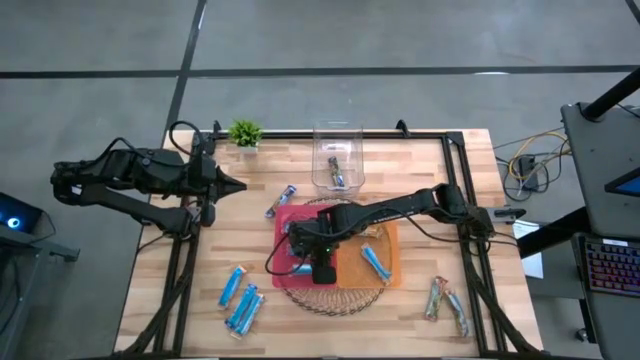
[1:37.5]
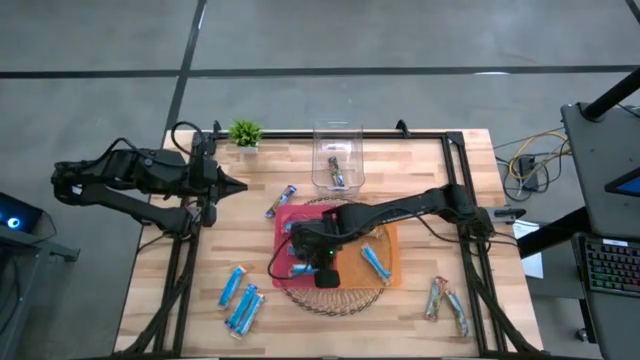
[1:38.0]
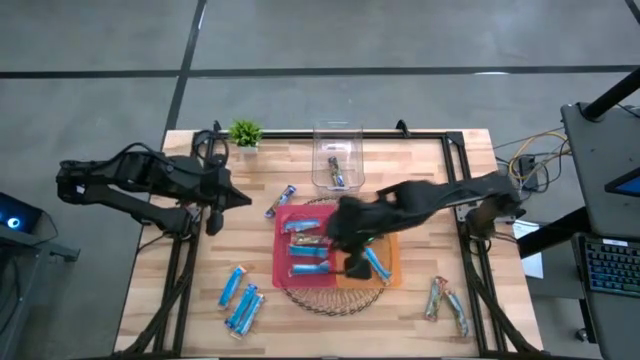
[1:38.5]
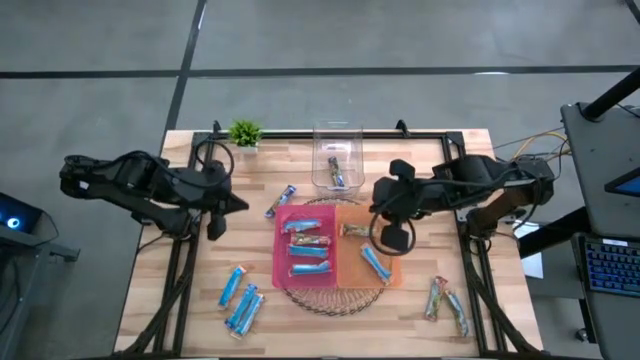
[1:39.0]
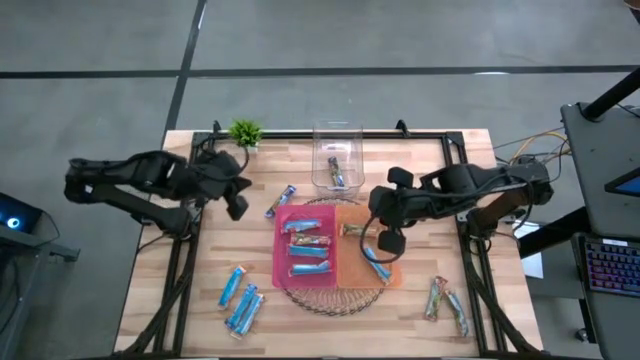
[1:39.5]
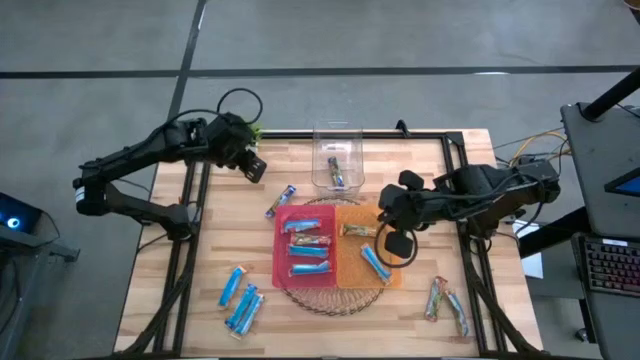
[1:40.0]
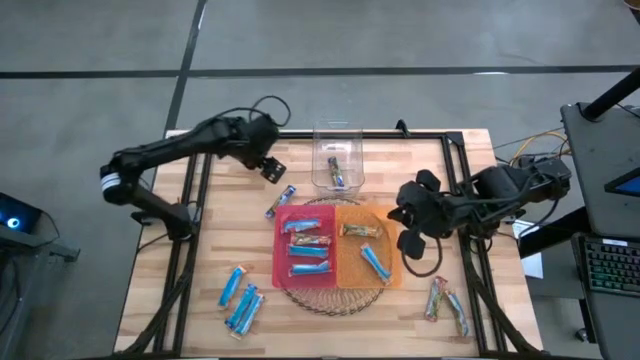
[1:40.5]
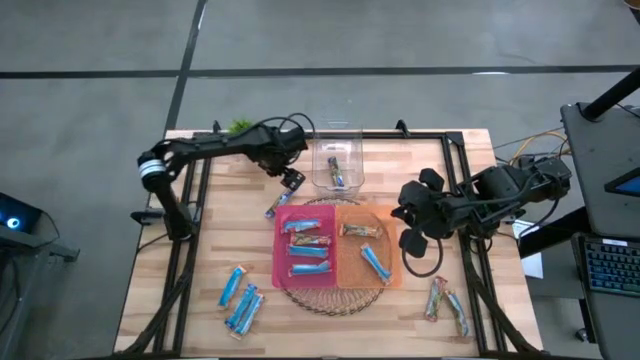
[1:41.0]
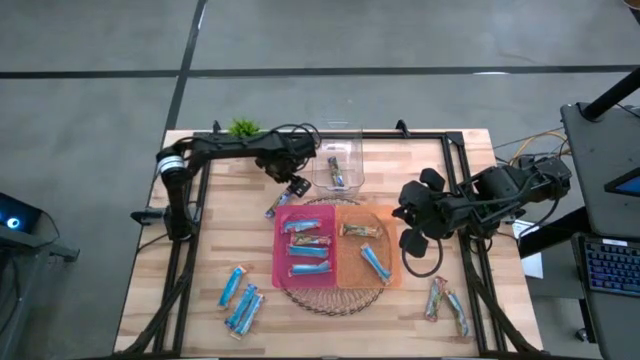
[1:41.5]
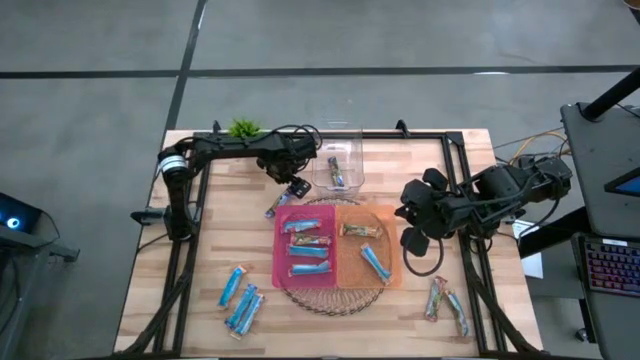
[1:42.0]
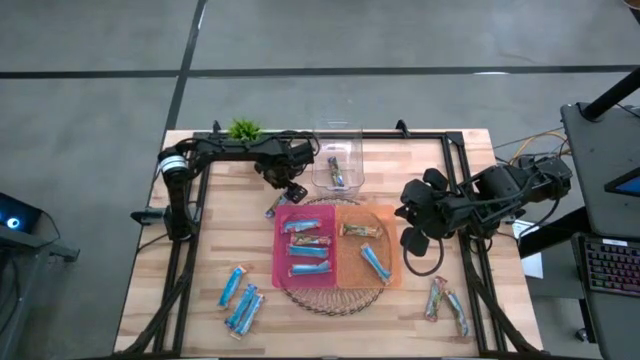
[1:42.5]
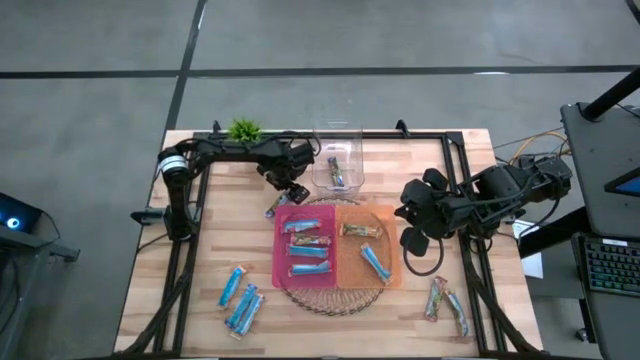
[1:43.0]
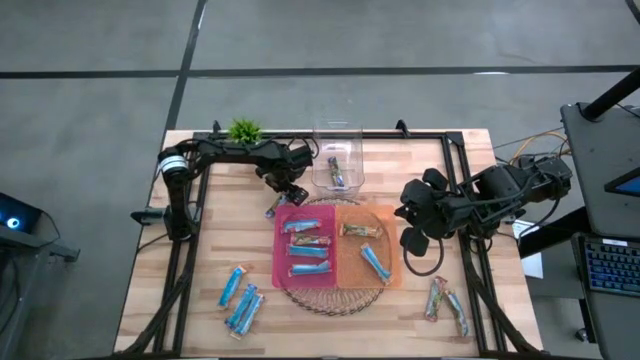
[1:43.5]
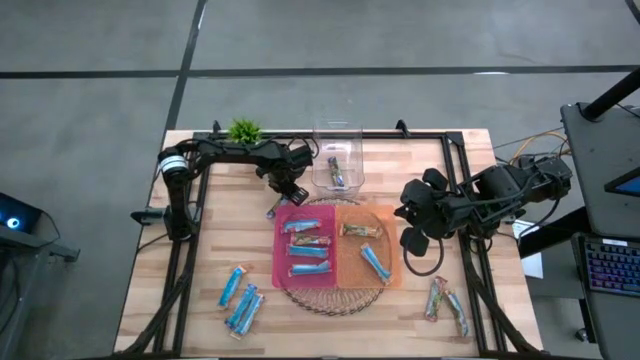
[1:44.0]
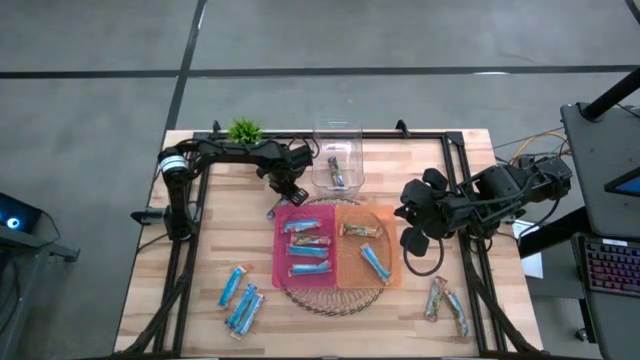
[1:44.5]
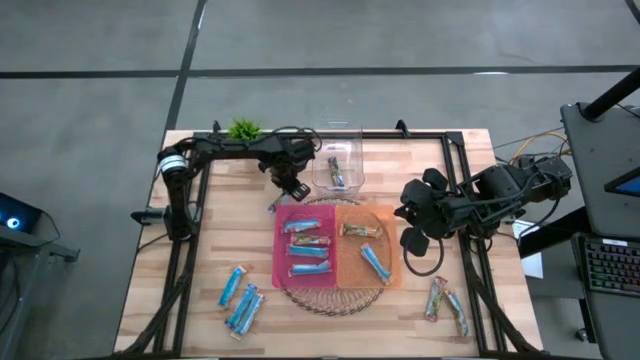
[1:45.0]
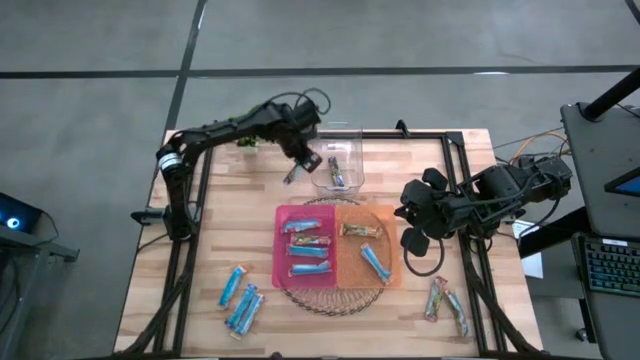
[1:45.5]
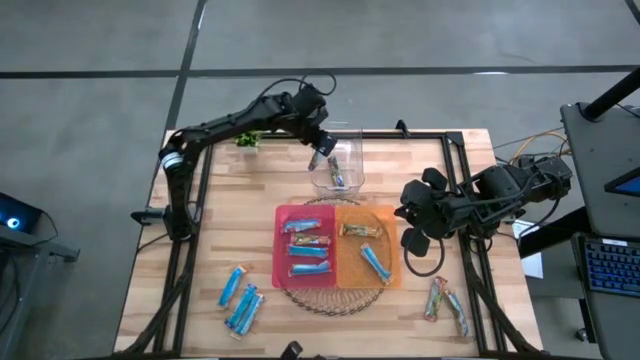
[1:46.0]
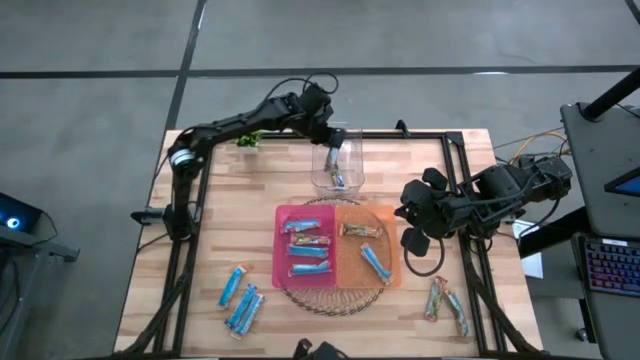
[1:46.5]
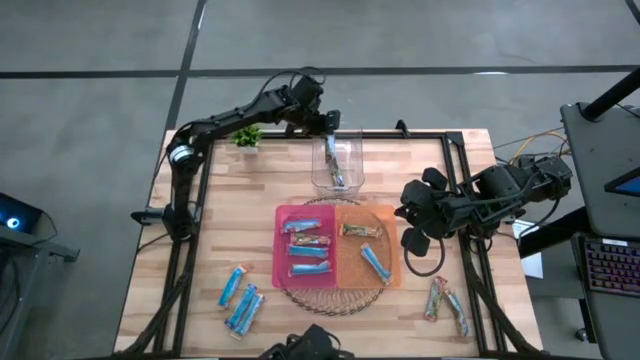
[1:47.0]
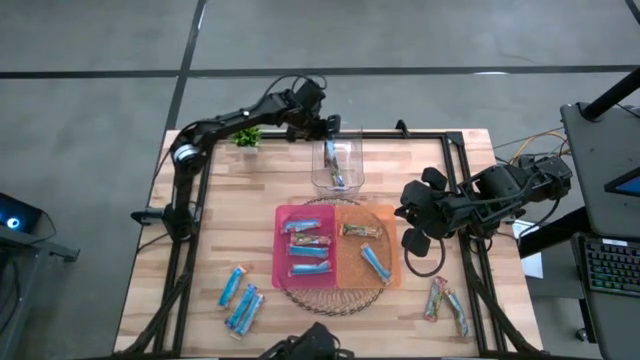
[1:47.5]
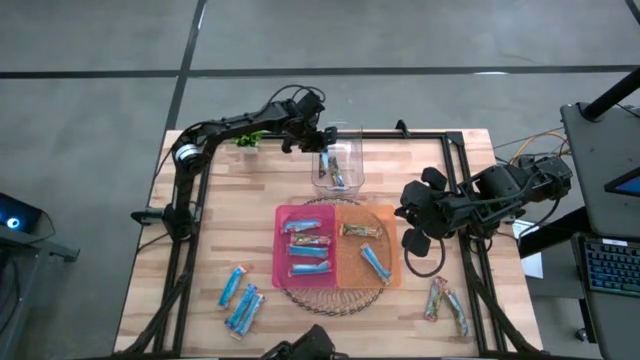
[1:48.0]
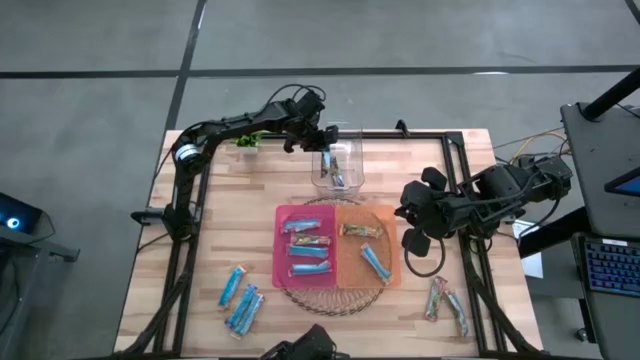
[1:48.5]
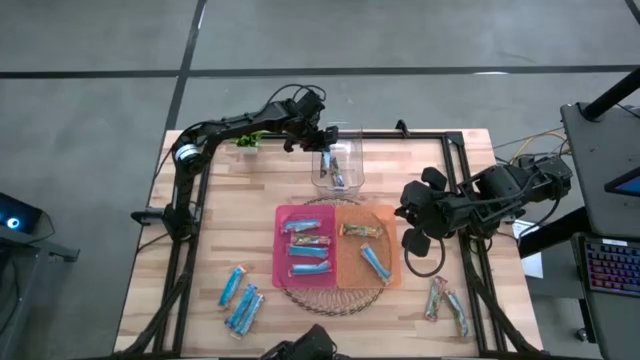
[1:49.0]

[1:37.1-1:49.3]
Task: Pick and place Granola Bars by type
Put the blue granola bar into the transparent bin

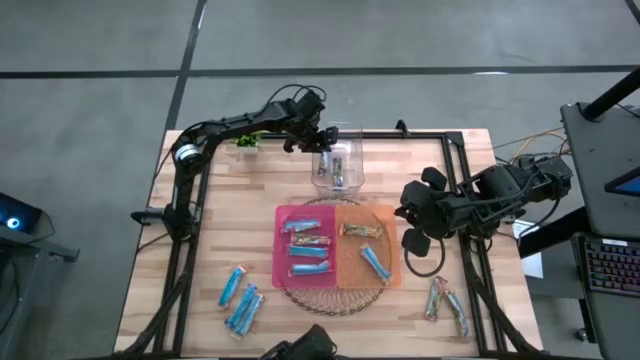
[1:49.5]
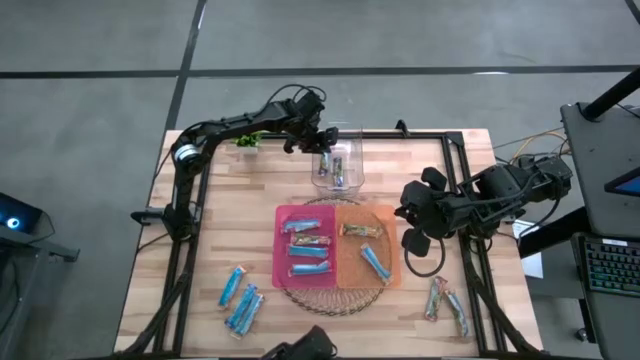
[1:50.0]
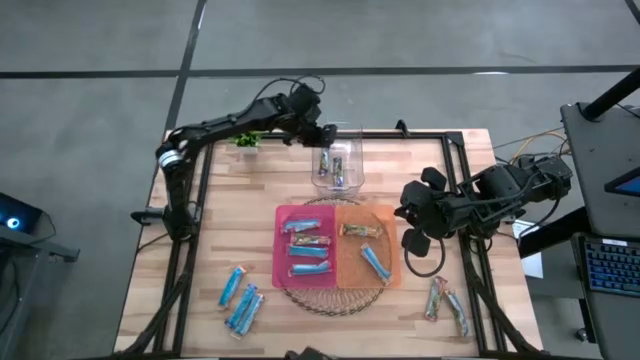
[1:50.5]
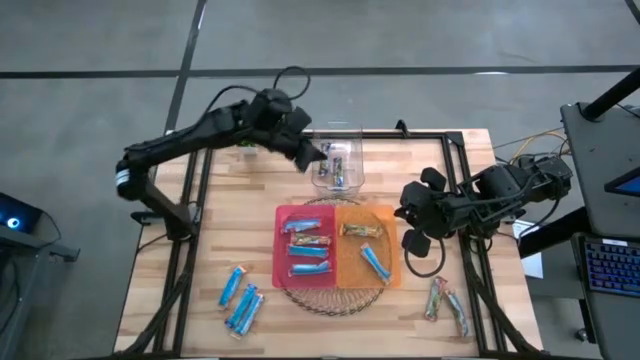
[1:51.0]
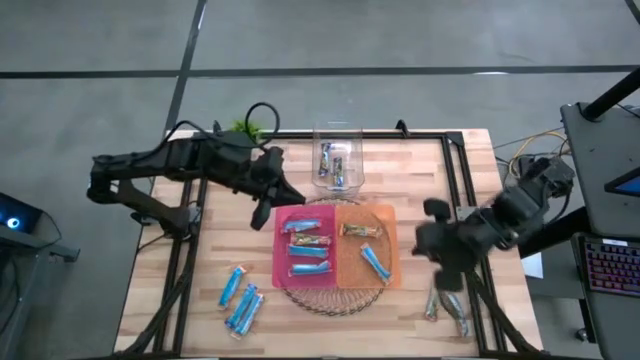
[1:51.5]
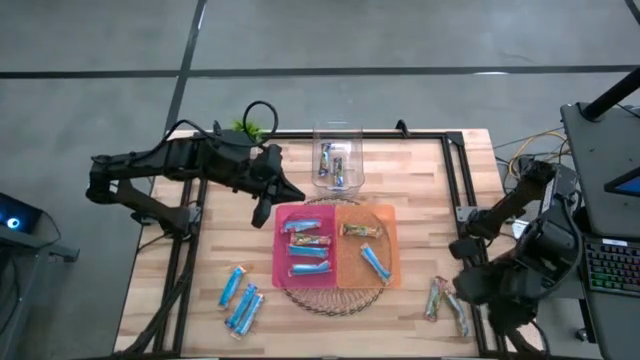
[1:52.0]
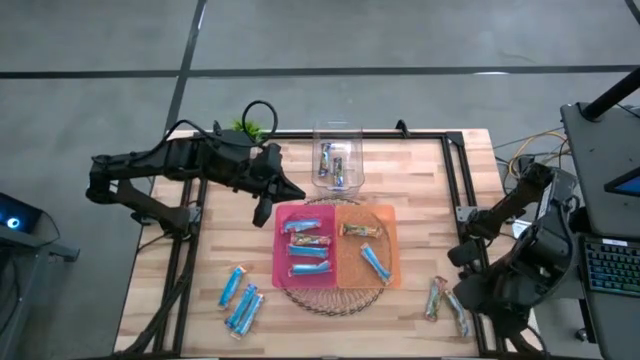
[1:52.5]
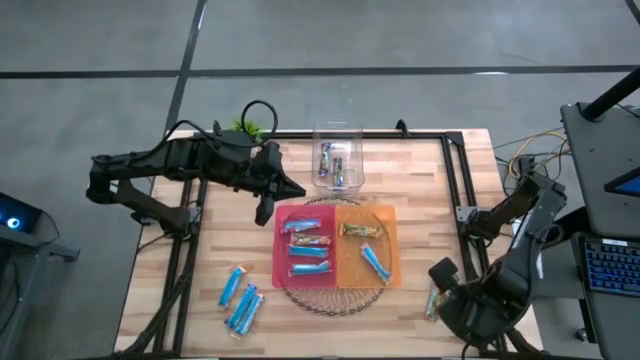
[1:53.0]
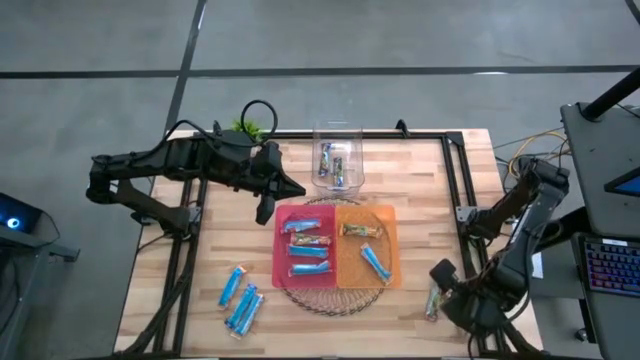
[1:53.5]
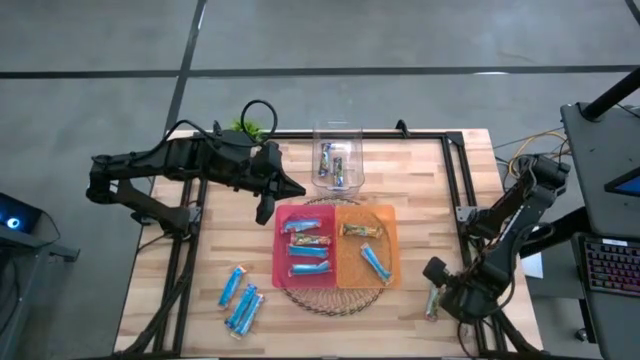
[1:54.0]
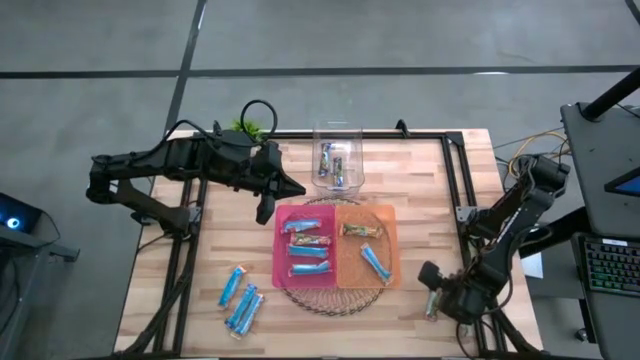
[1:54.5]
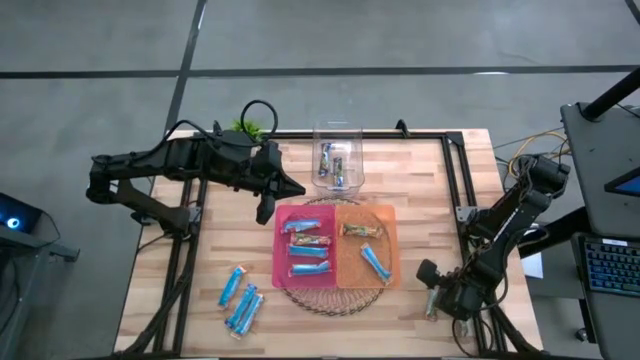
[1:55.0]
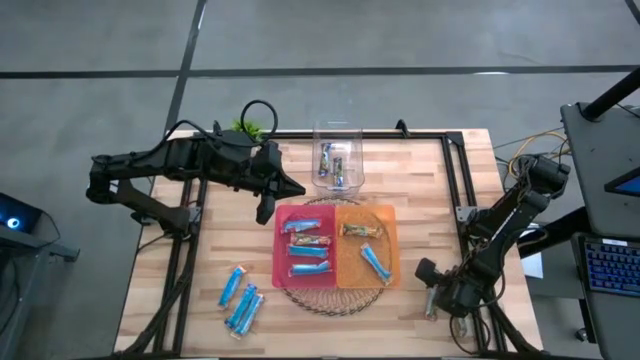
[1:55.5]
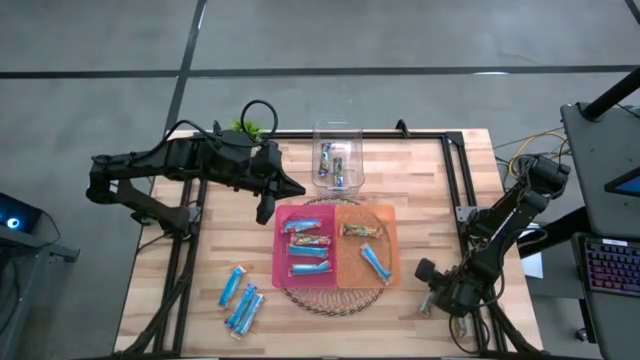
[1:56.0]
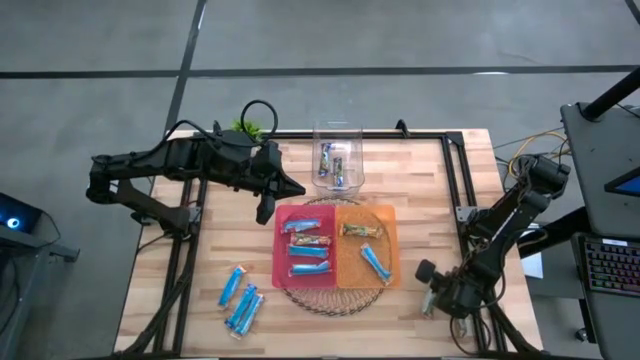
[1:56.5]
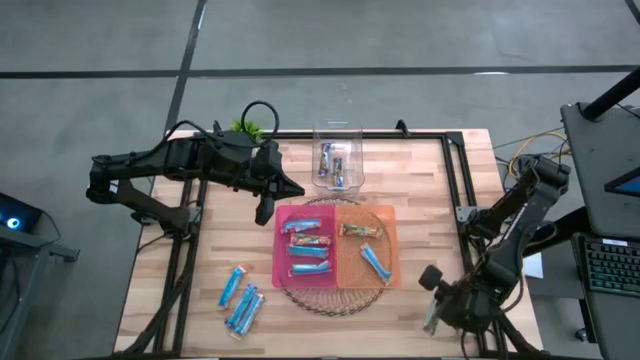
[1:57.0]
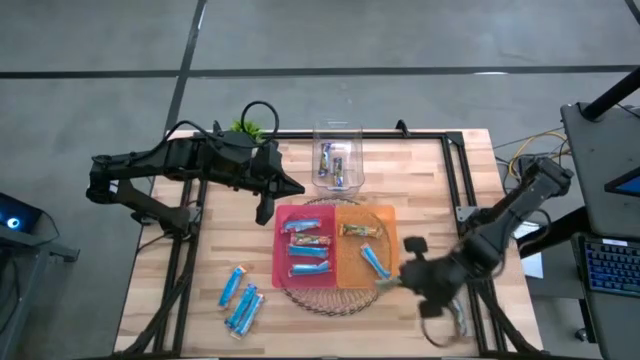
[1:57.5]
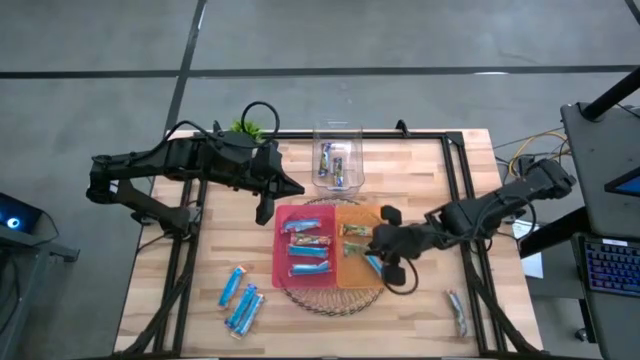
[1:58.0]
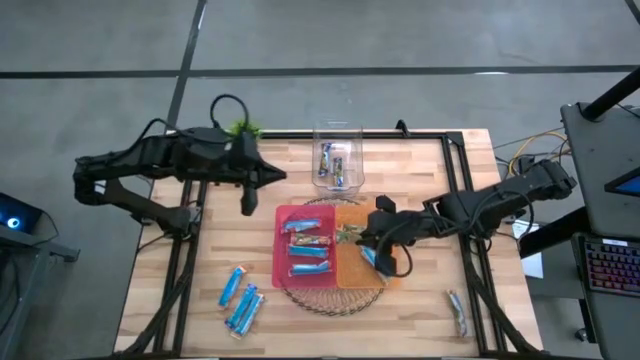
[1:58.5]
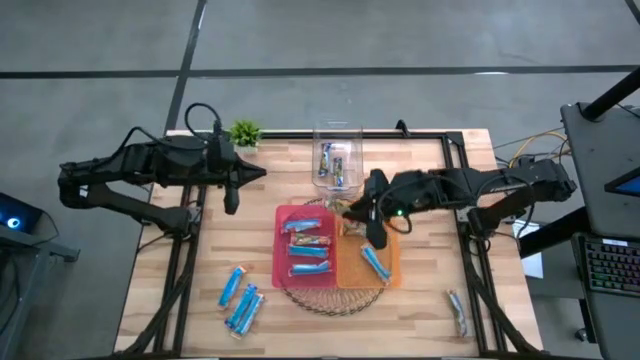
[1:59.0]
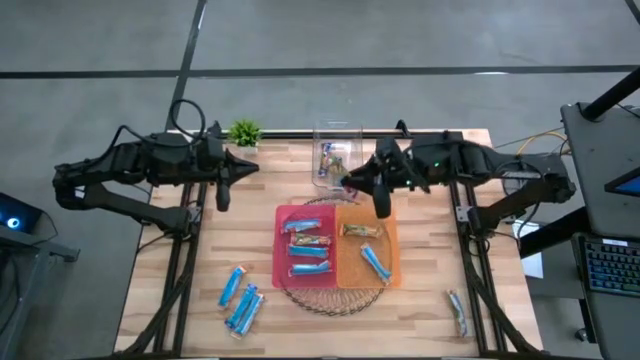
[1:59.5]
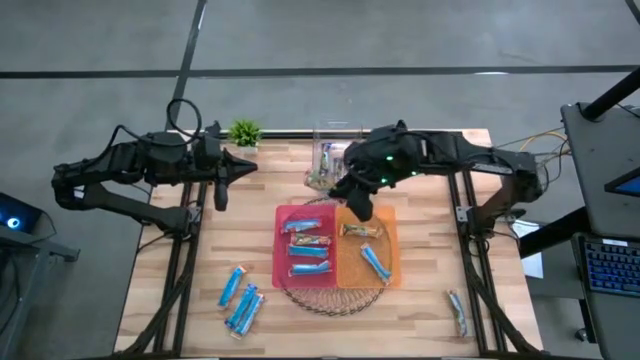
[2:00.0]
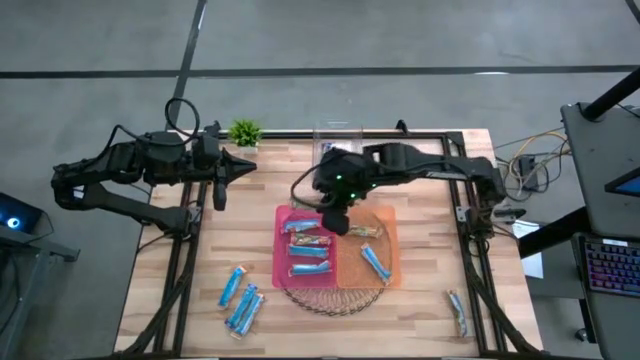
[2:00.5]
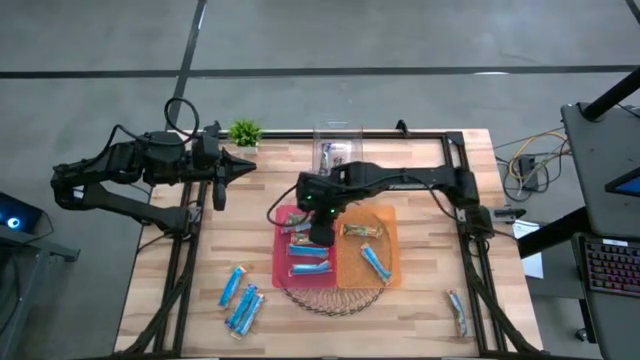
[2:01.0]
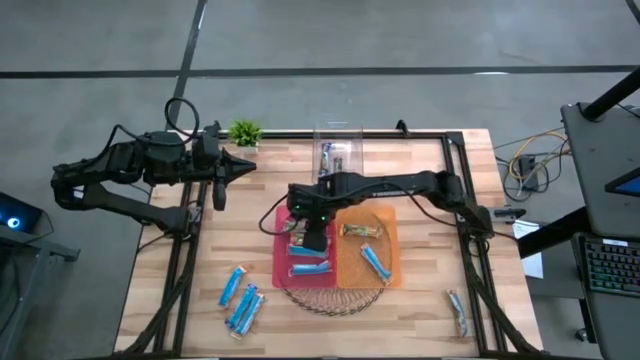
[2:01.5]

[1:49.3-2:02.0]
Put the red granola bar into the red bin
